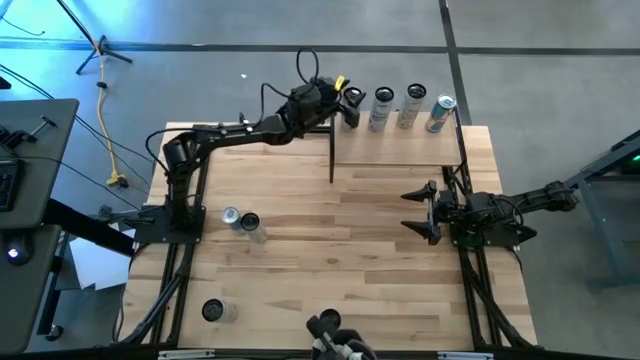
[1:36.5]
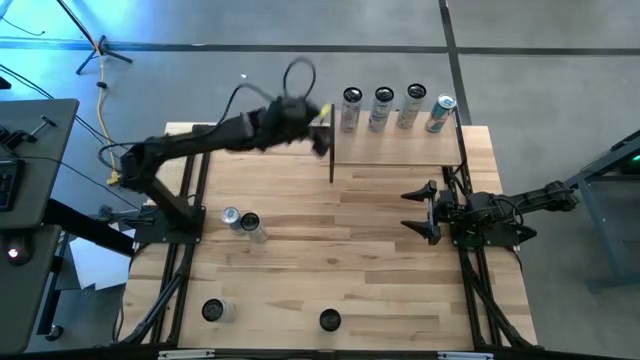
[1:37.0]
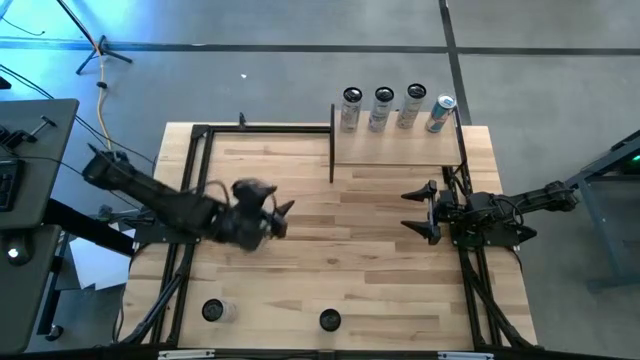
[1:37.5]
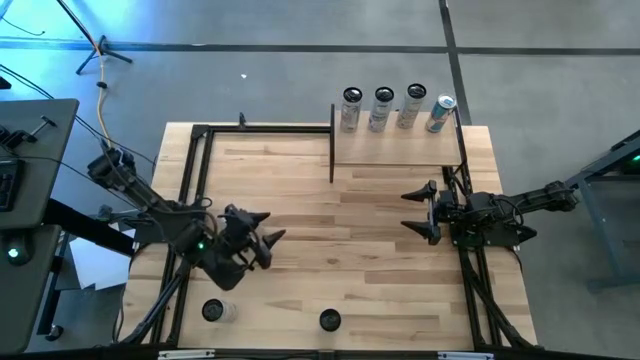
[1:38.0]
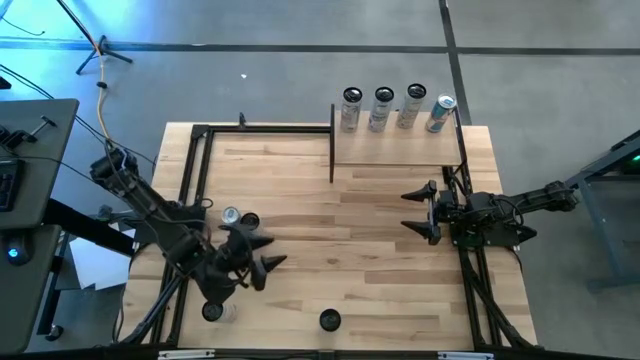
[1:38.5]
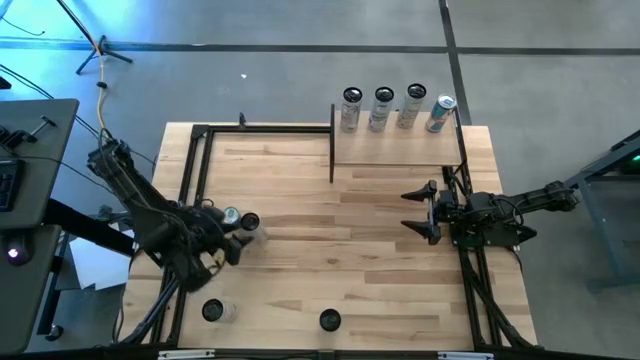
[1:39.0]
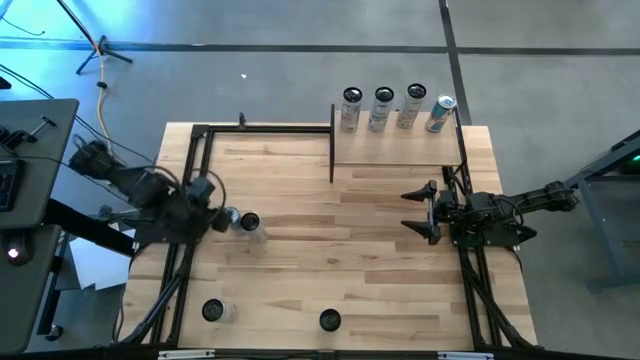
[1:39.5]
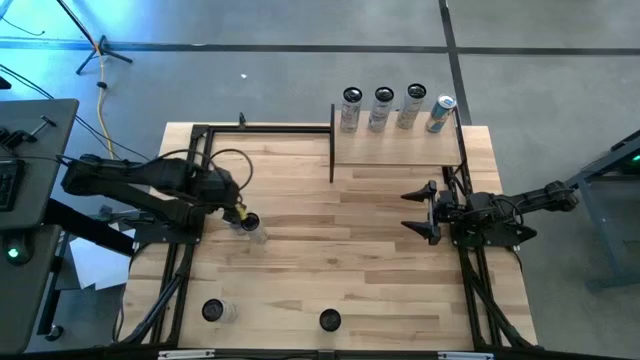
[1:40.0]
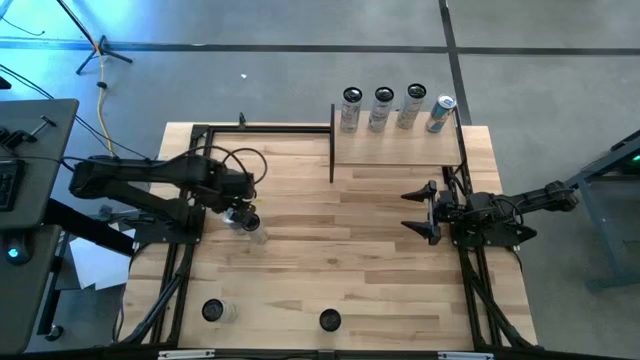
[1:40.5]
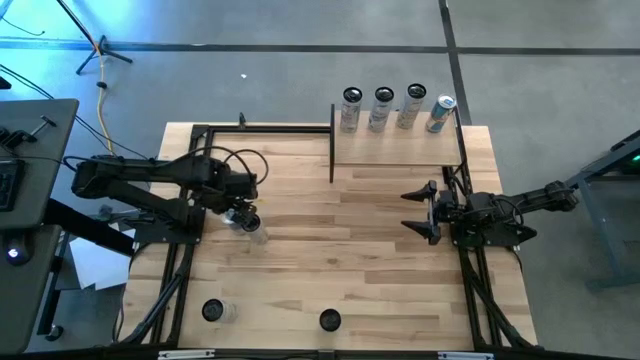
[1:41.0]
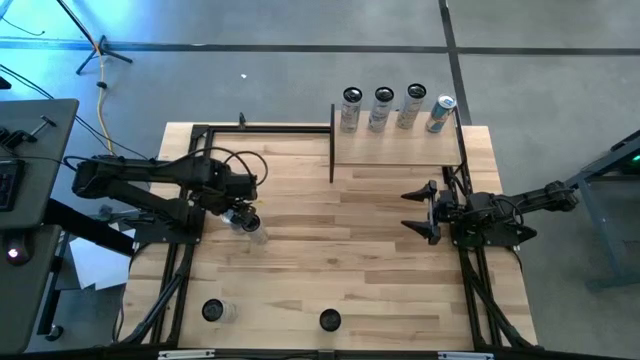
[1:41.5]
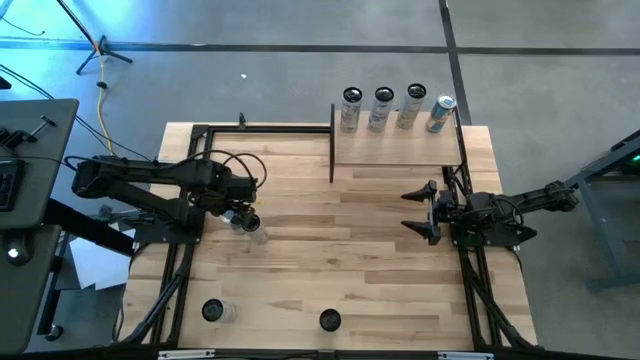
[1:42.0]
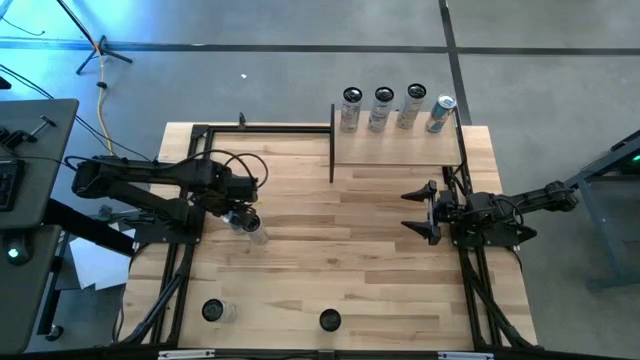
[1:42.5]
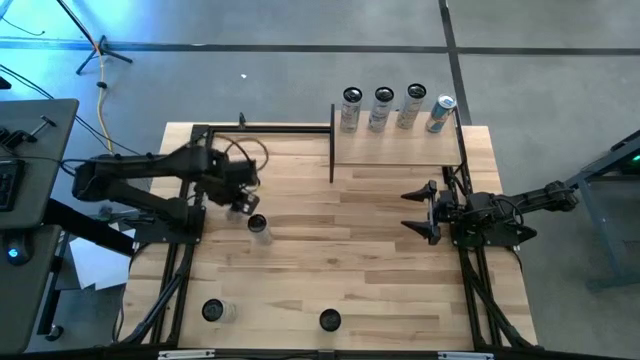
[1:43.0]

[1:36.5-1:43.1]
Task: Place canned beverage on shelf
Move the blue soda can to the center of the table

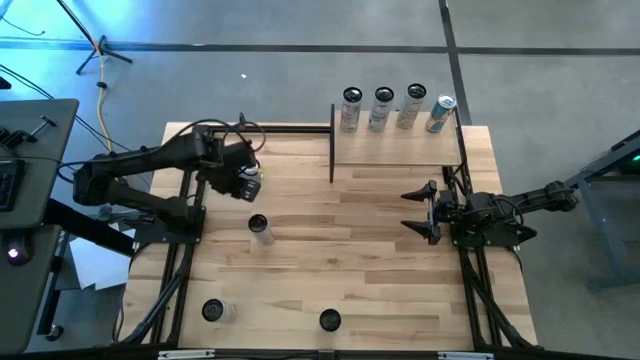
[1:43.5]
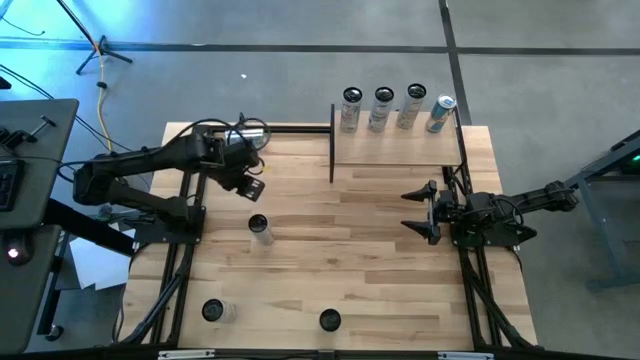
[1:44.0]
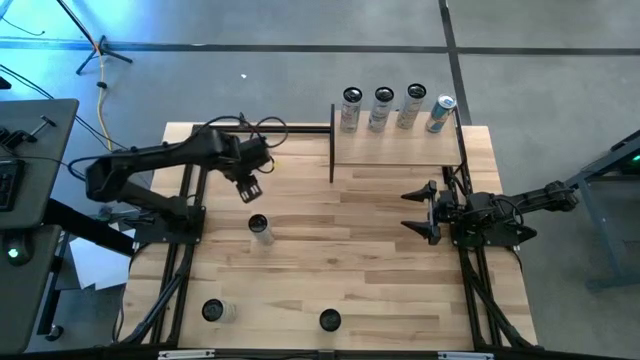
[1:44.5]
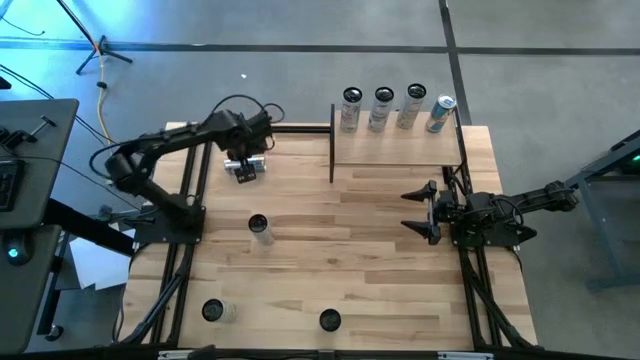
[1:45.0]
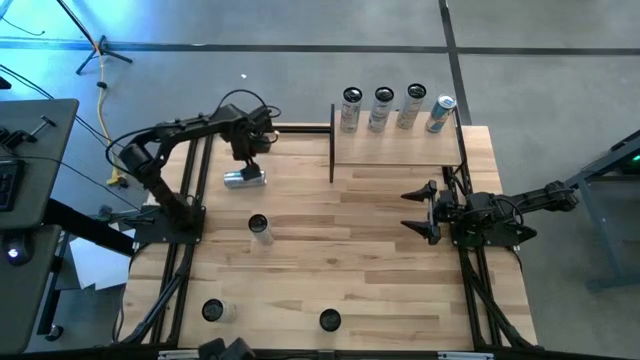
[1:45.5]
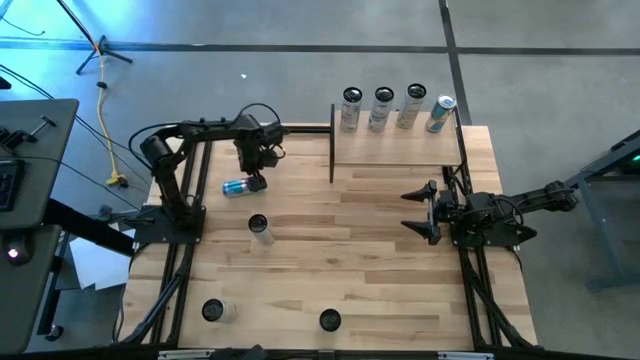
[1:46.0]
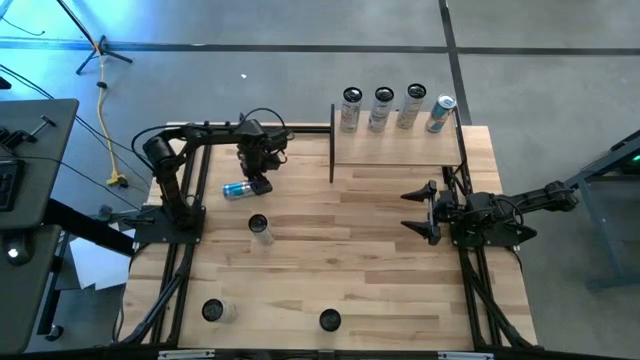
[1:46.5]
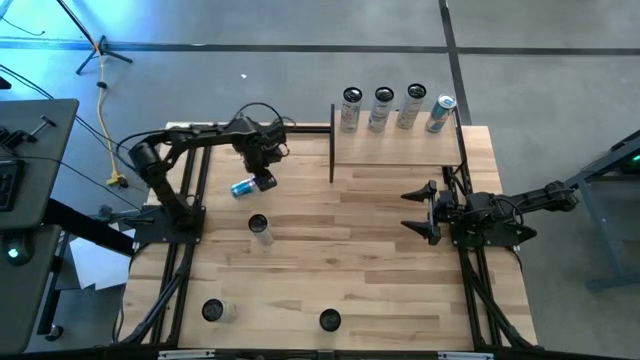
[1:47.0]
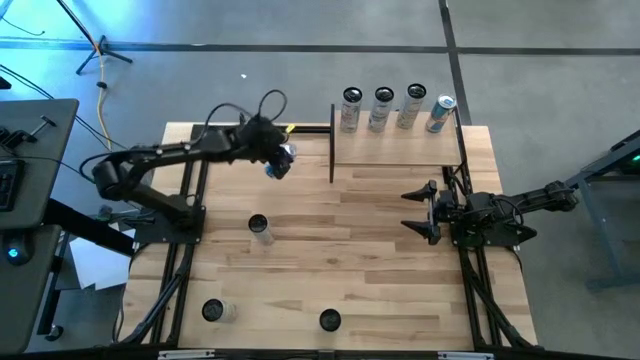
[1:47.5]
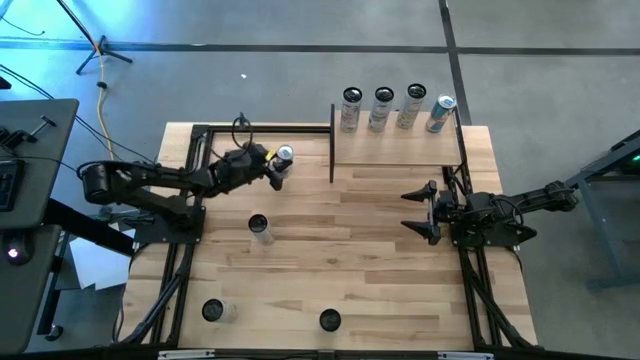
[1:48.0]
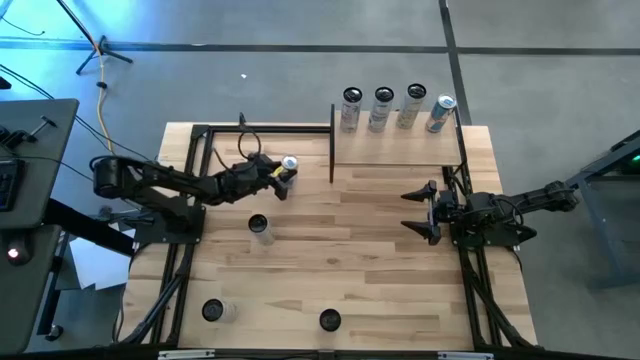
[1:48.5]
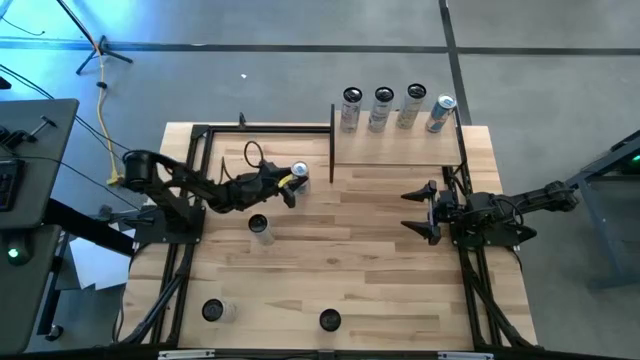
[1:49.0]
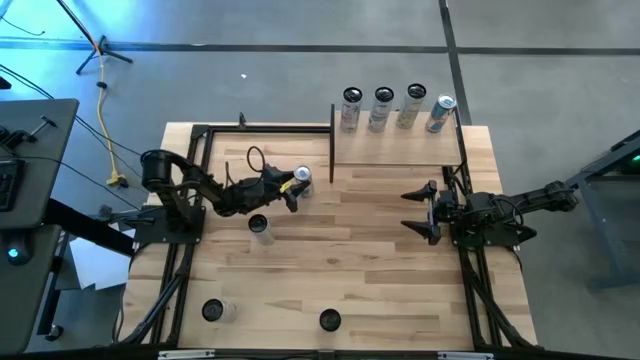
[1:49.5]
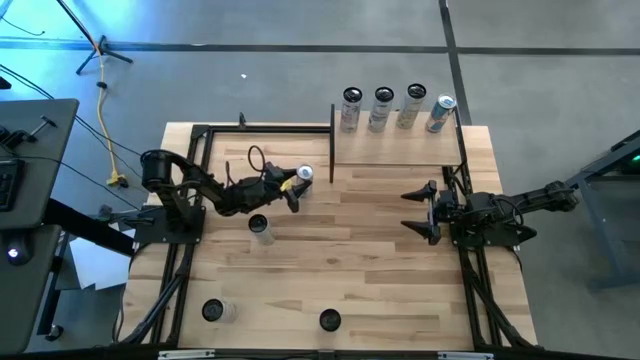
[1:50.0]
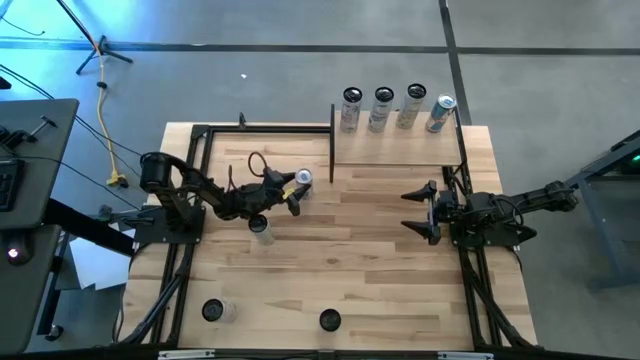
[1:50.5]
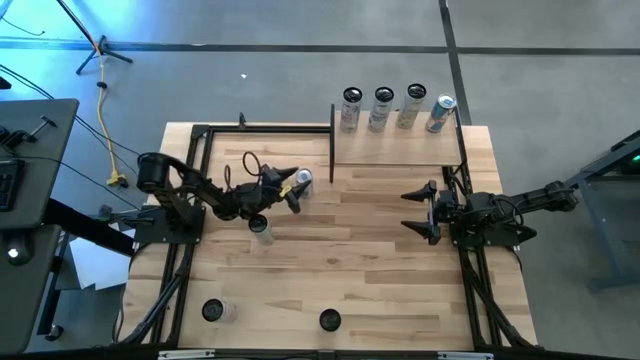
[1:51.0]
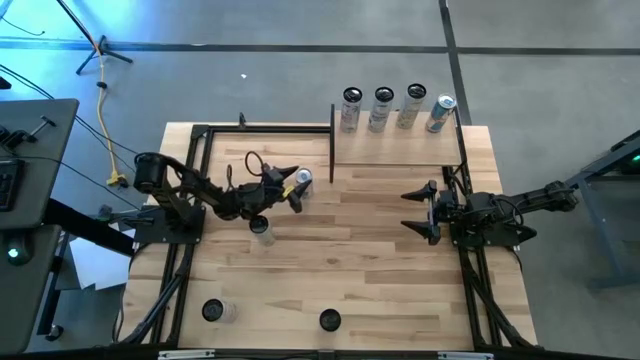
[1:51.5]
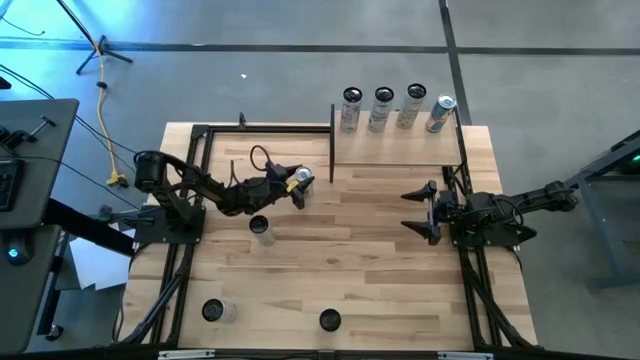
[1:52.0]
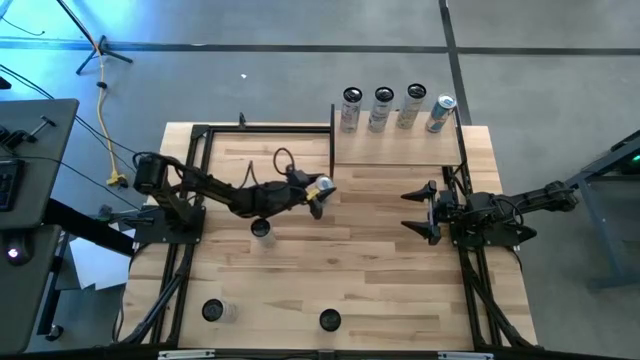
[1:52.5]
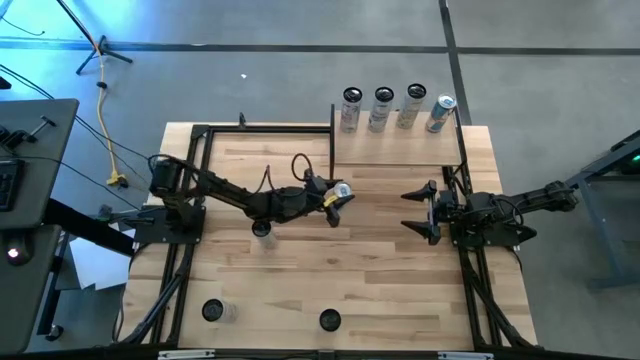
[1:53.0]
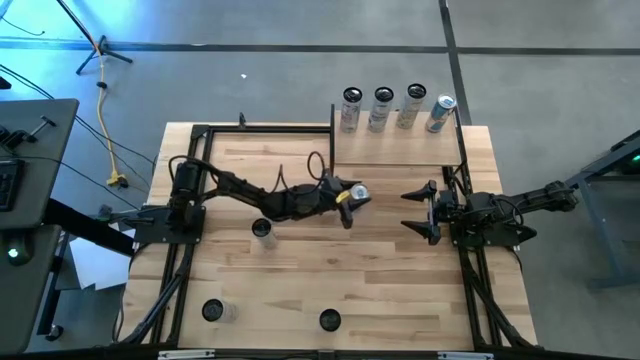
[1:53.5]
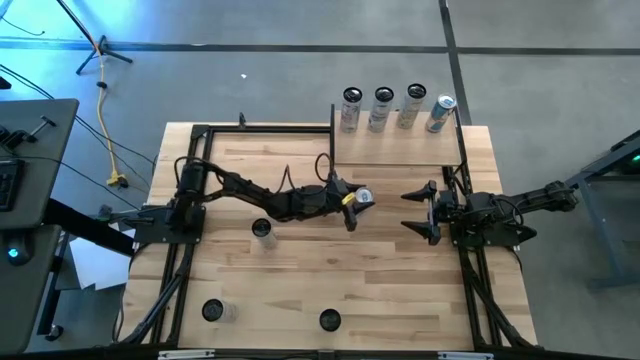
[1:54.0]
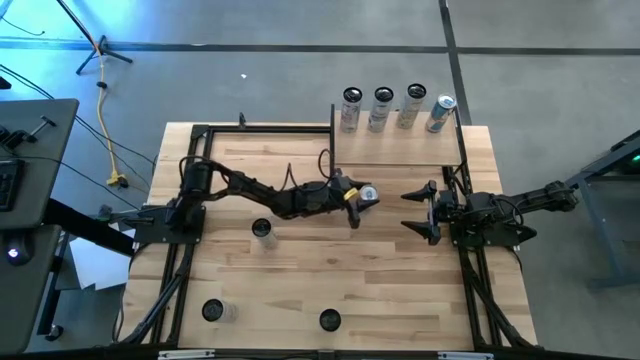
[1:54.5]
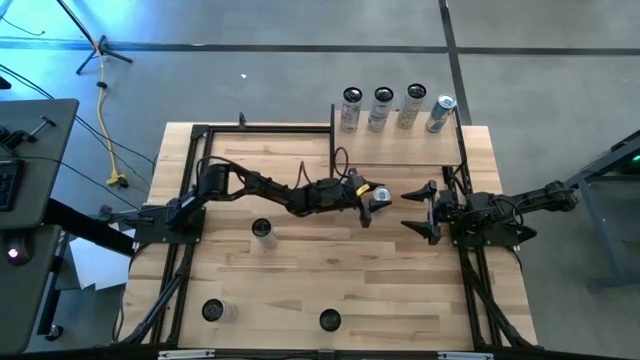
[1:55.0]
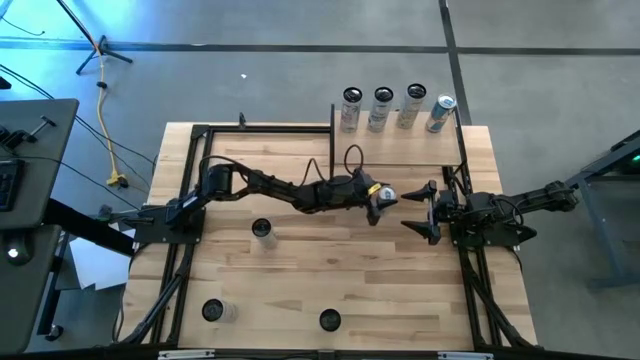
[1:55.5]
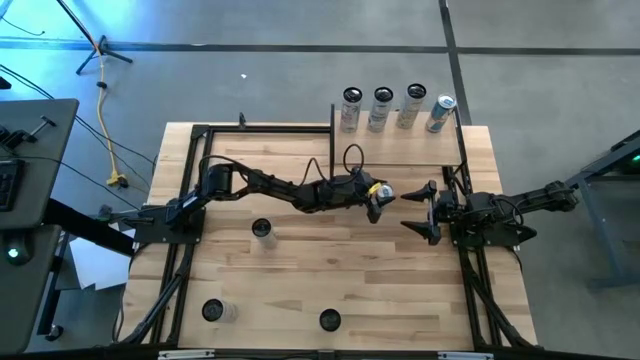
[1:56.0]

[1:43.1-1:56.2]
Move the blue soda can to the center of the table
